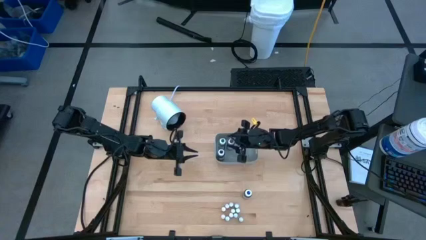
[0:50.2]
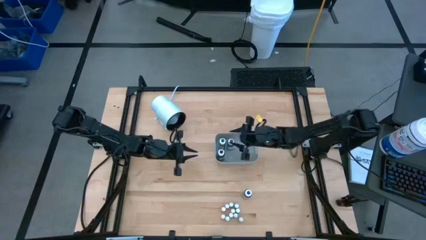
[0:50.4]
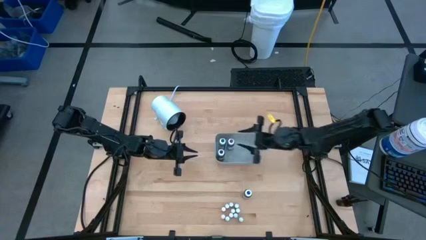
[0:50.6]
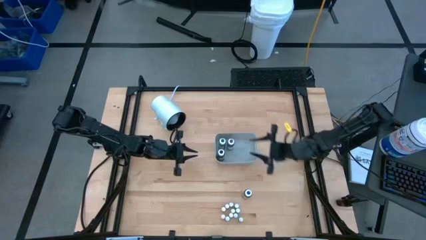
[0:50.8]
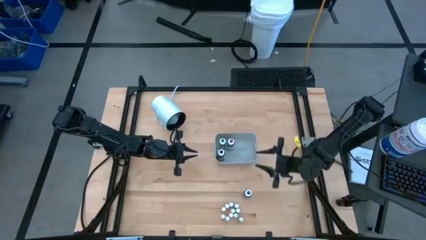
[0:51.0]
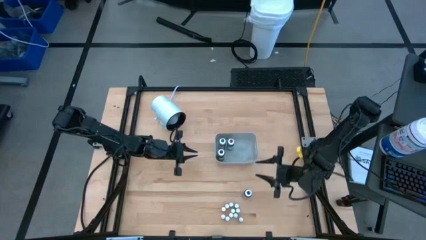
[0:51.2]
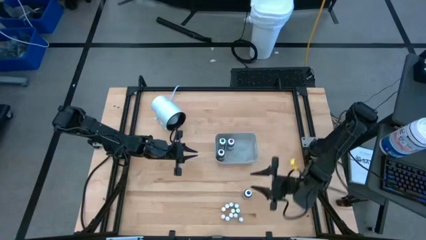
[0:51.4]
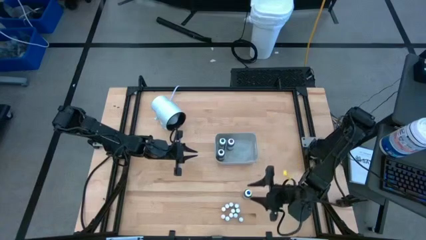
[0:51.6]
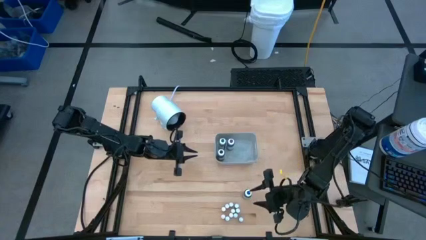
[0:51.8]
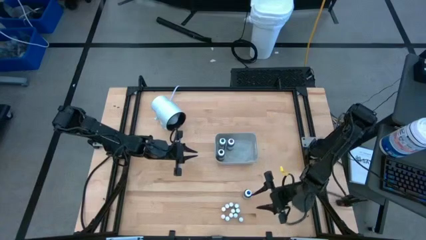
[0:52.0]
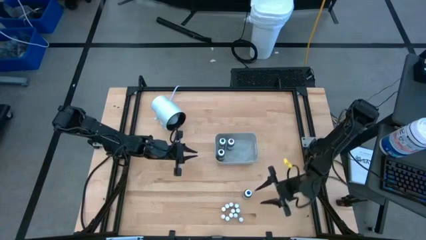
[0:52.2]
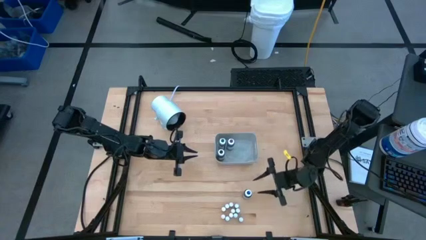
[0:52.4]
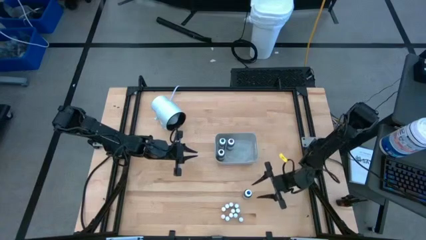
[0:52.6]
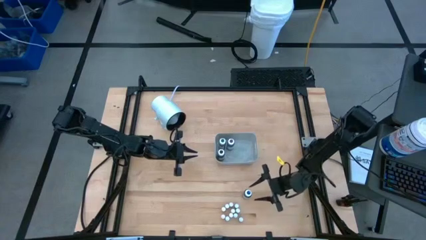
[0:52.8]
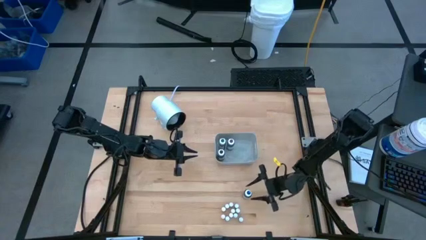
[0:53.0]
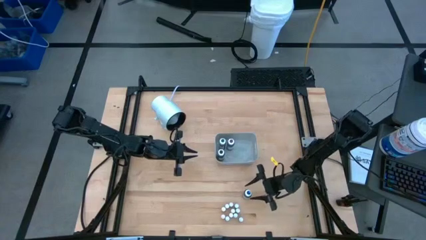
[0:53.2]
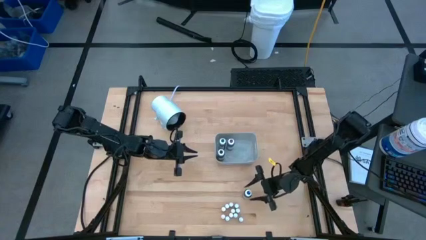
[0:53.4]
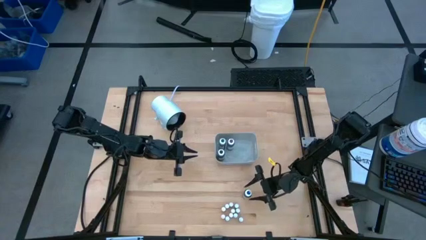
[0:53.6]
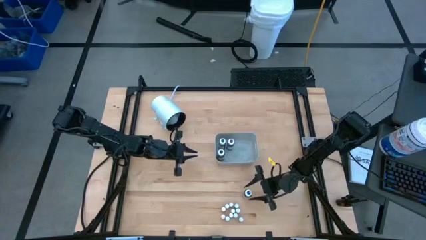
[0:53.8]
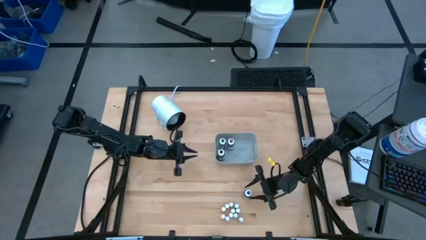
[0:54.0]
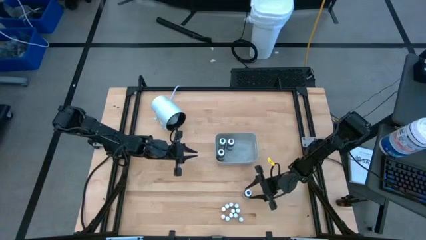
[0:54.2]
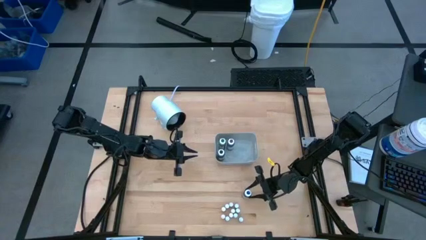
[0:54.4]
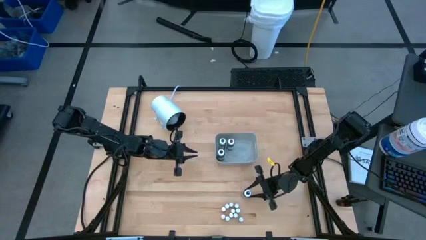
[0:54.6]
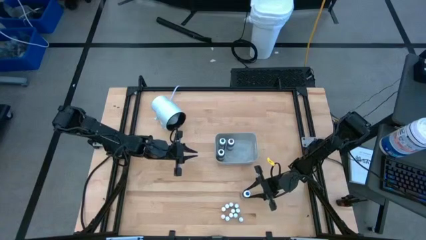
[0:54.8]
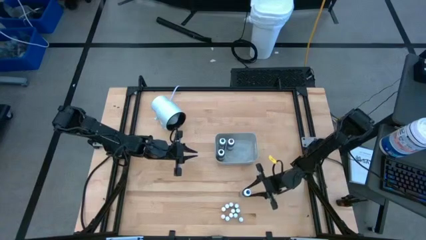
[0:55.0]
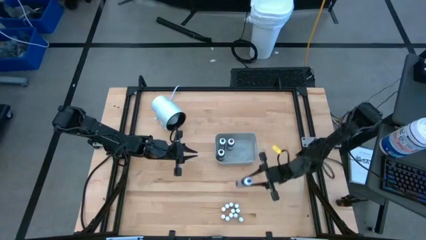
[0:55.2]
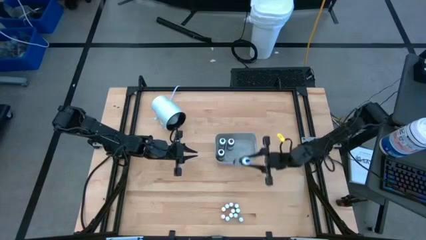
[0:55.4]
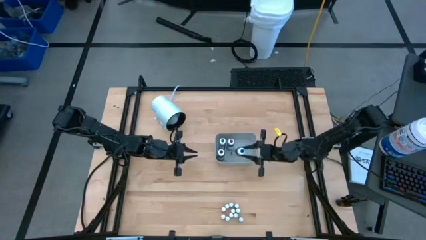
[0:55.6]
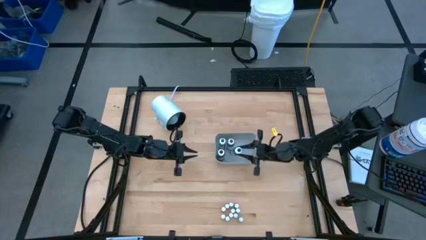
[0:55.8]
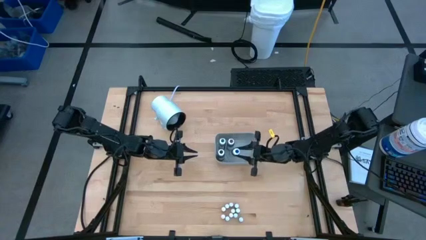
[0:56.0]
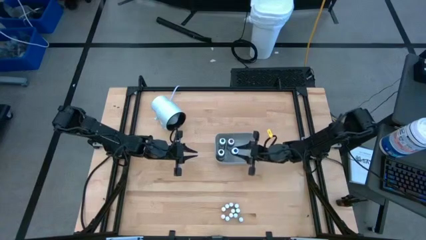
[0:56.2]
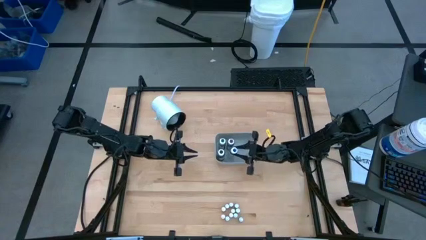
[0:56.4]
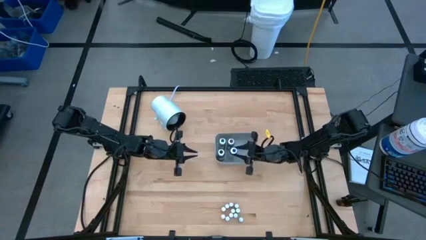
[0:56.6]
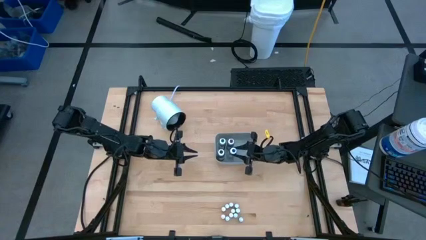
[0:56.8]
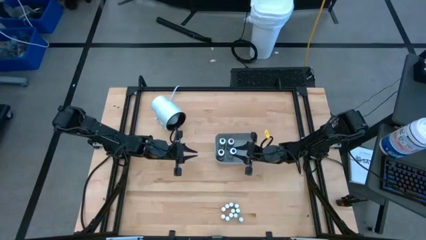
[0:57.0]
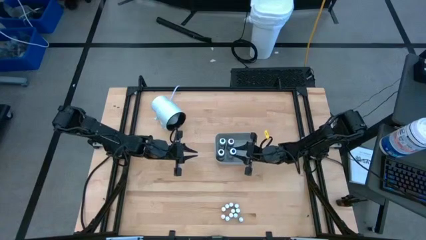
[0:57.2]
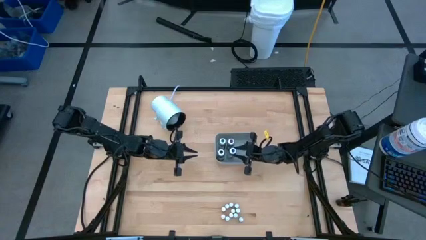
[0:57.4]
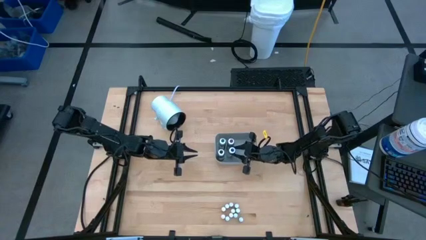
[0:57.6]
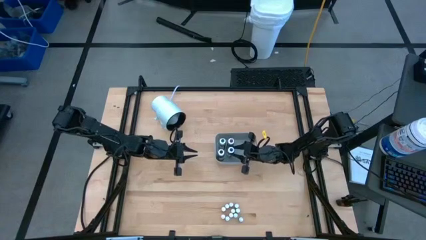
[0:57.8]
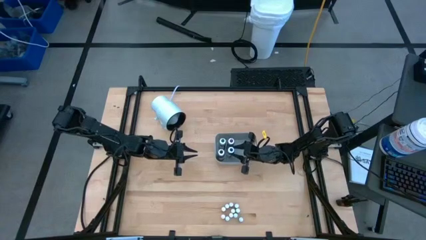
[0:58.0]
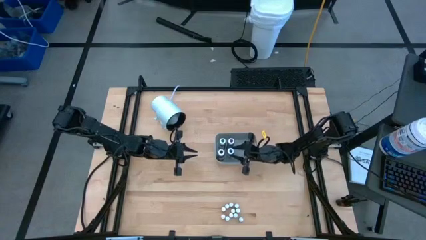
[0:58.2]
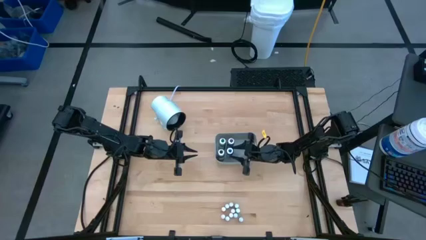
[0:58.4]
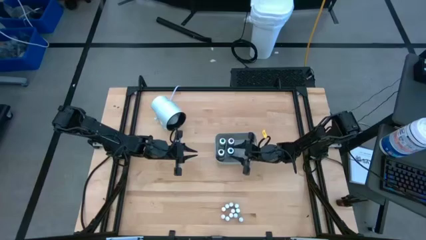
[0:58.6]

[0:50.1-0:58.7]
Task: Pick & Place food coloring
Put the big blue food coloring bottle into the gray bin

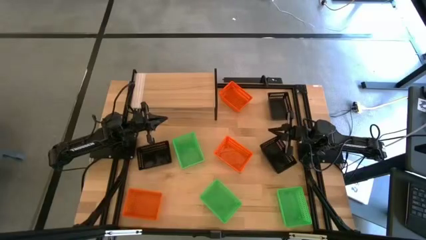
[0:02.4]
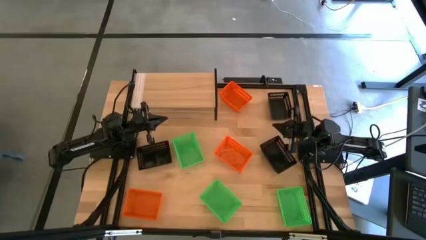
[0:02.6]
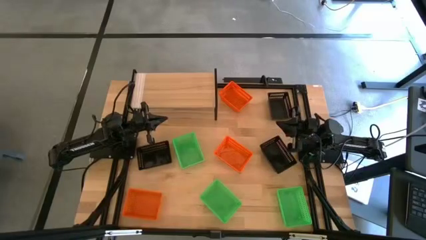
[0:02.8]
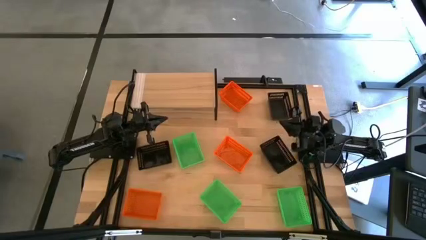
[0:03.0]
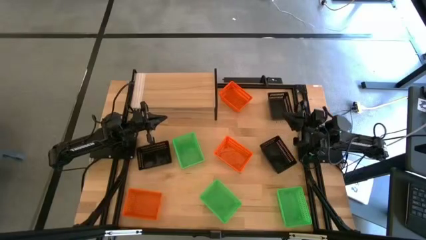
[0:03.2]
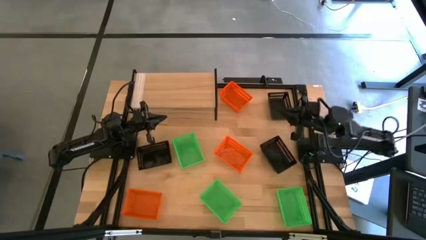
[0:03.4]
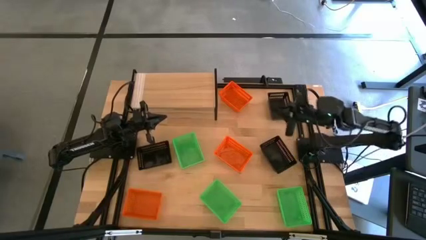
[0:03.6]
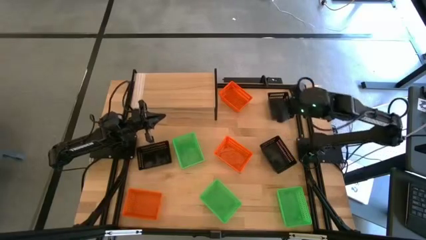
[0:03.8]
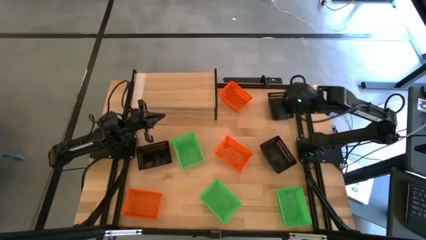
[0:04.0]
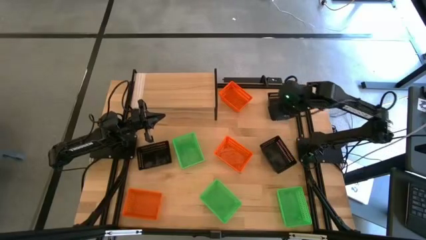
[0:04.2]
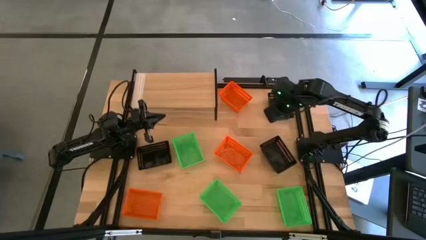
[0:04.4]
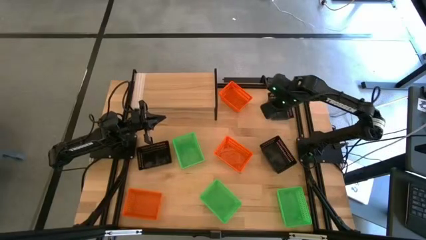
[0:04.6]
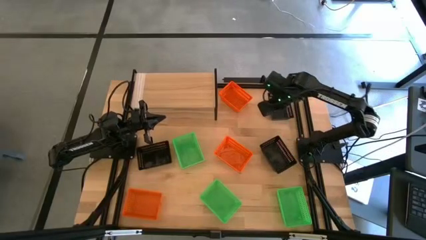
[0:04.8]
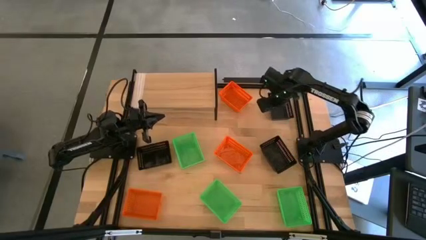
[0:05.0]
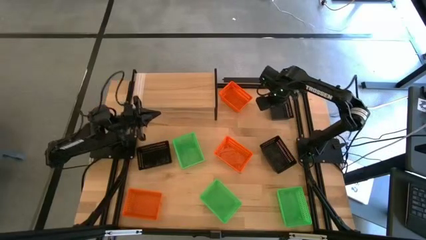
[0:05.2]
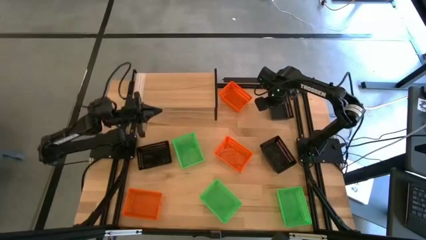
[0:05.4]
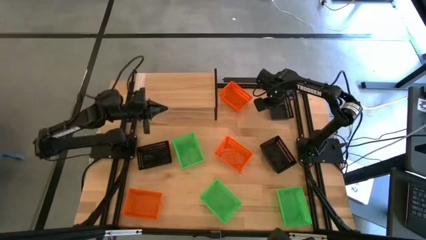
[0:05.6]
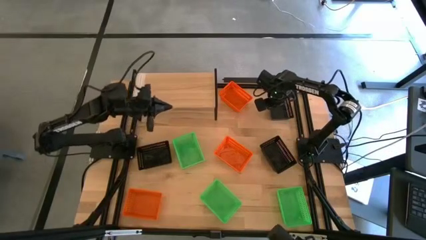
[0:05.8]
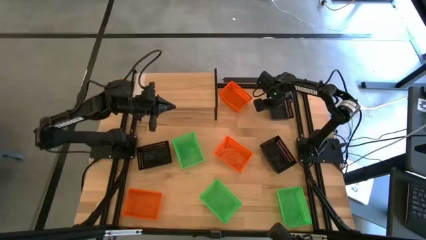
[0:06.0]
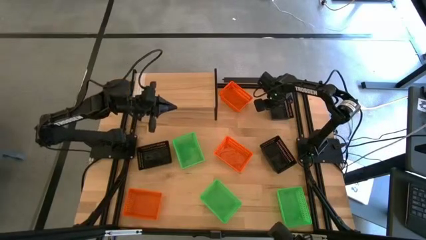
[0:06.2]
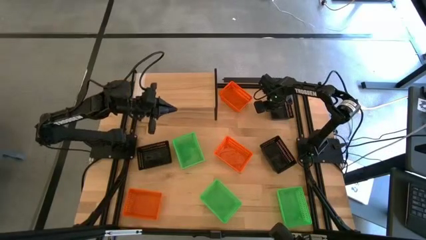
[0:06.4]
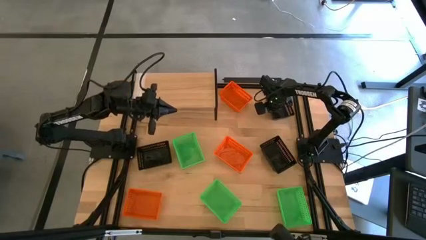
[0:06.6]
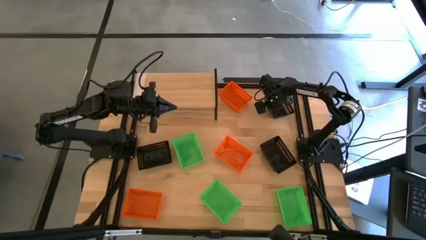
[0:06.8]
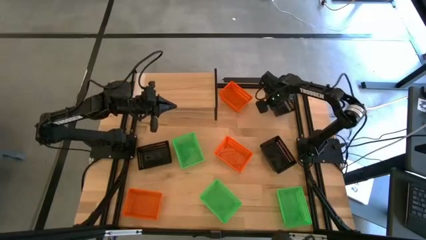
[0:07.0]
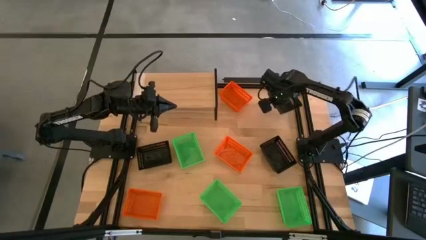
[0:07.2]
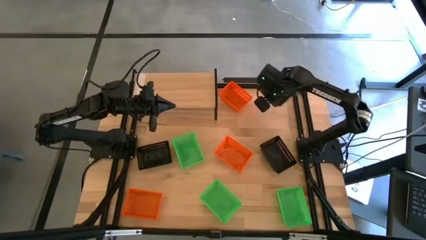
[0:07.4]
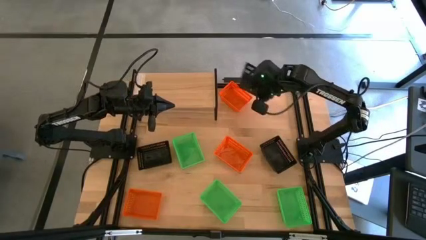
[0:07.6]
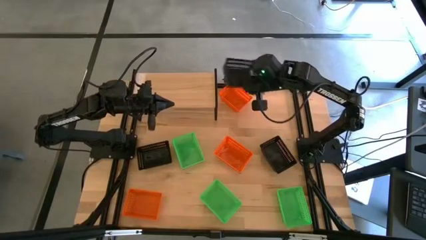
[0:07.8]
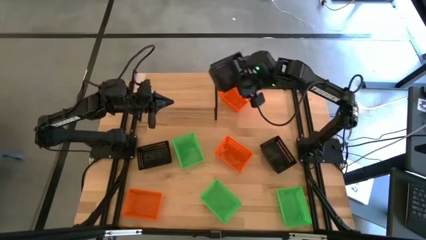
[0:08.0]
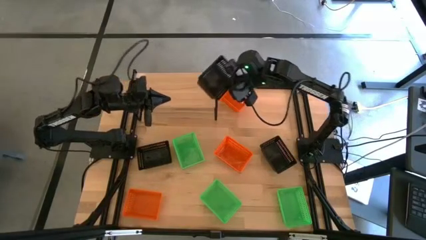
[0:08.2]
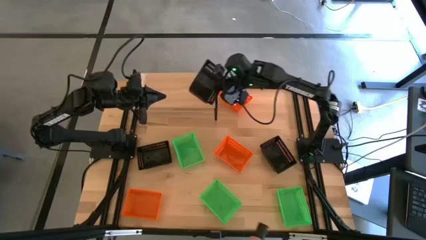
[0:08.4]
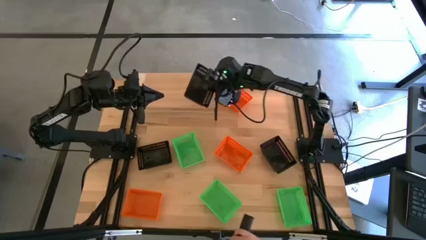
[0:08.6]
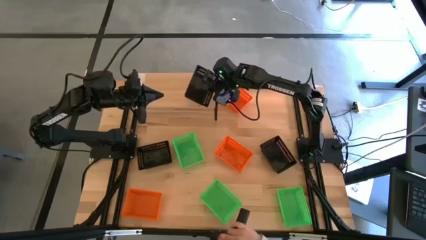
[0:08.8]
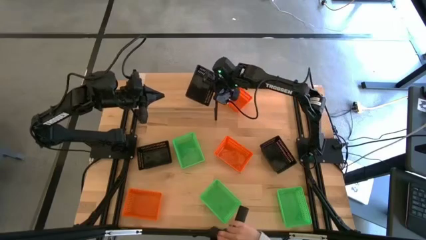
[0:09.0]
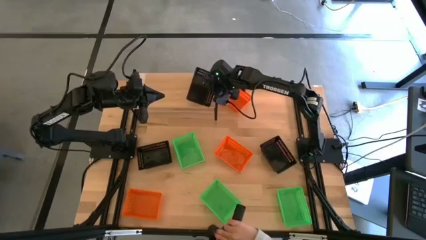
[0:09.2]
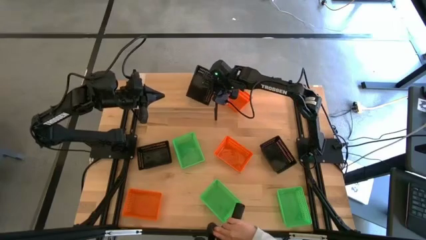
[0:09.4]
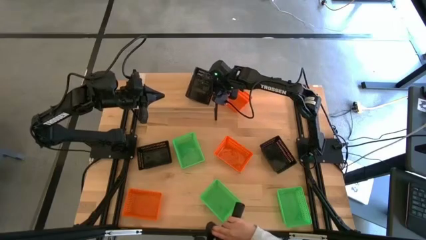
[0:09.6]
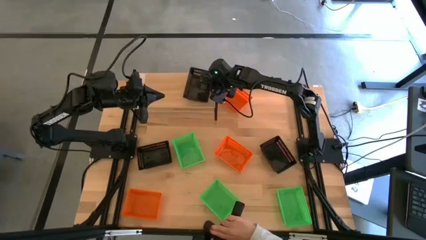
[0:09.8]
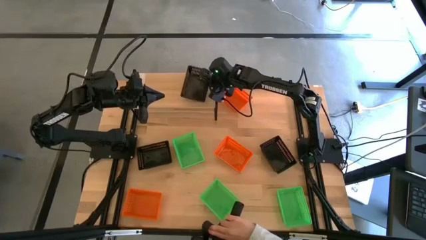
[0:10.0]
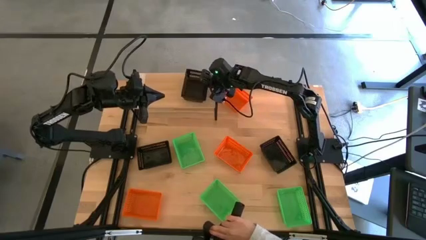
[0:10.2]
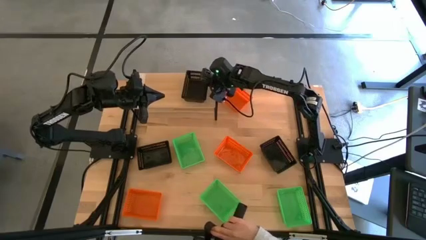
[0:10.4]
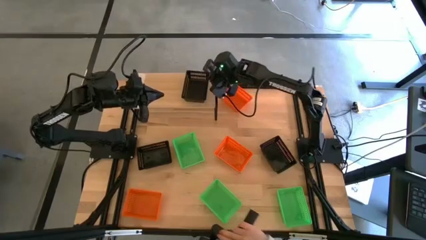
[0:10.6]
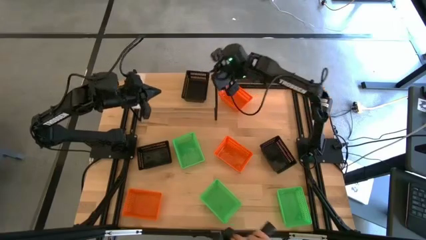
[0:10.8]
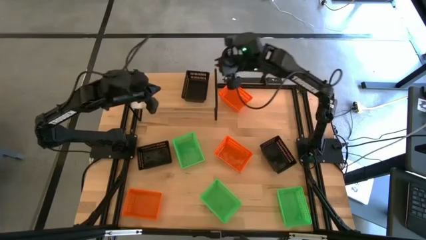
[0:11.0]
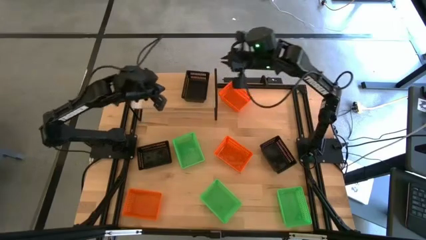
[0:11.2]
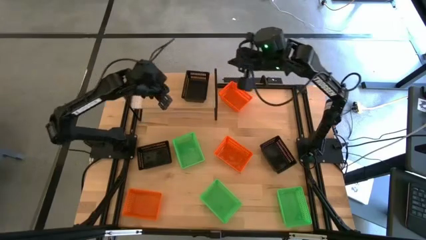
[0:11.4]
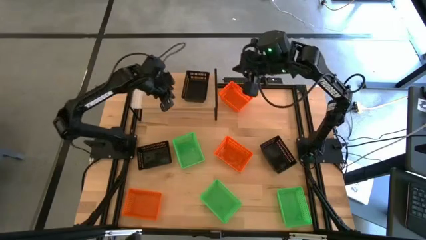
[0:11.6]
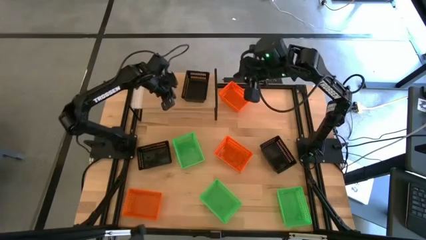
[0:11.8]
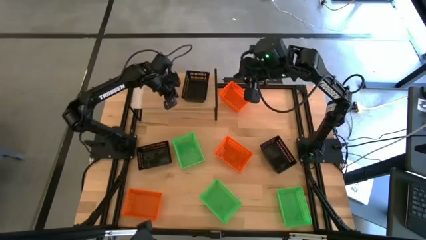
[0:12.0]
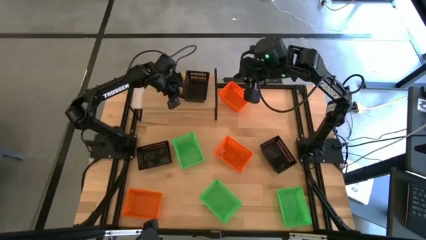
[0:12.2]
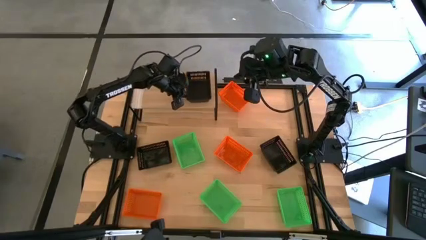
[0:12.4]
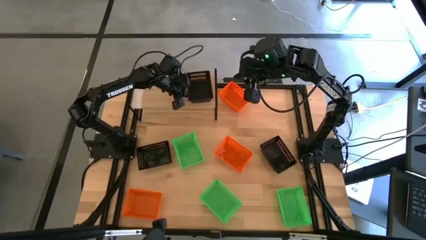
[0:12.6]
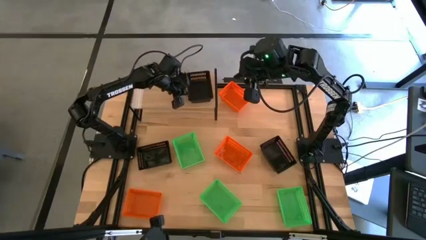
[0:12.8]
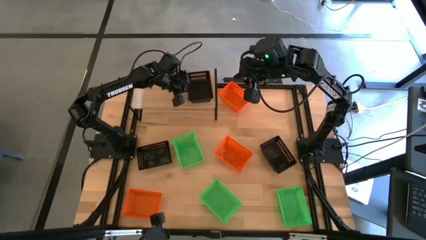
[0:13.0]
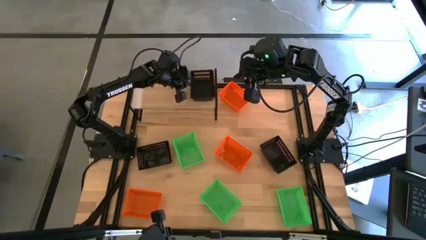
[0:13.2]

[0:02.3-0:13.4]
Task: Stack baskets on shelf by color
Put the top right black bin on the shelf
